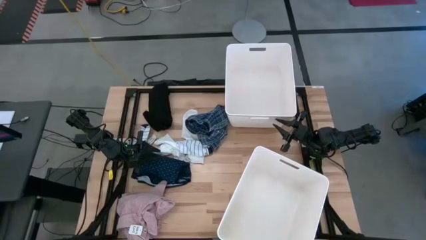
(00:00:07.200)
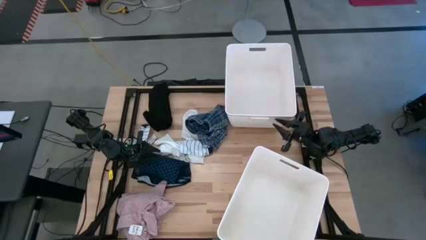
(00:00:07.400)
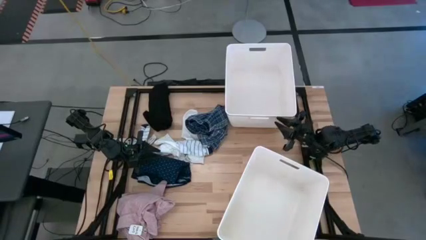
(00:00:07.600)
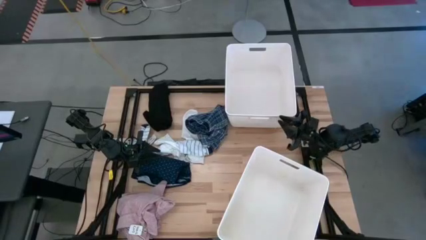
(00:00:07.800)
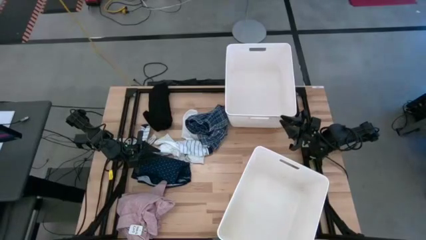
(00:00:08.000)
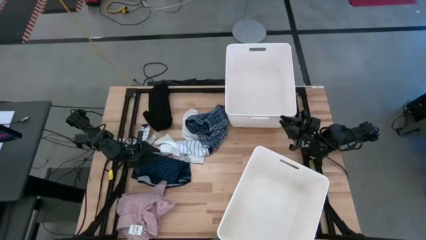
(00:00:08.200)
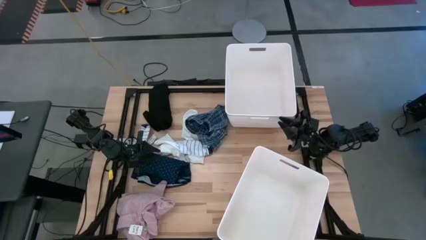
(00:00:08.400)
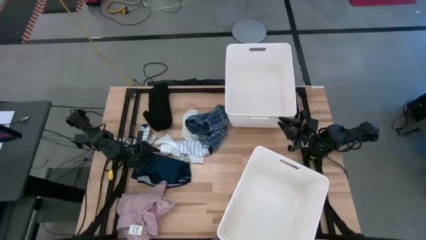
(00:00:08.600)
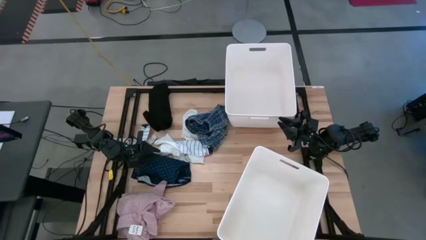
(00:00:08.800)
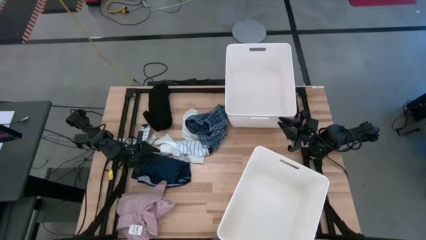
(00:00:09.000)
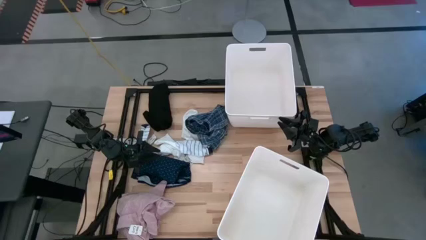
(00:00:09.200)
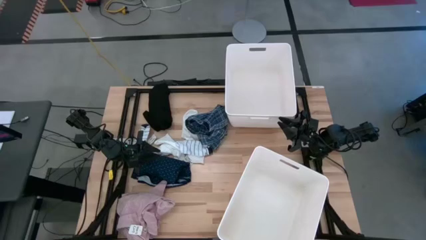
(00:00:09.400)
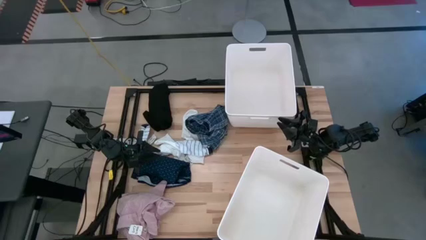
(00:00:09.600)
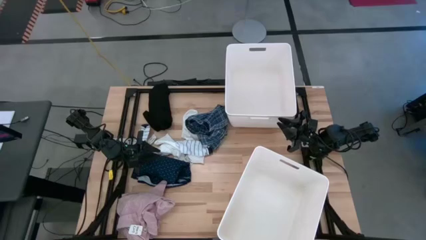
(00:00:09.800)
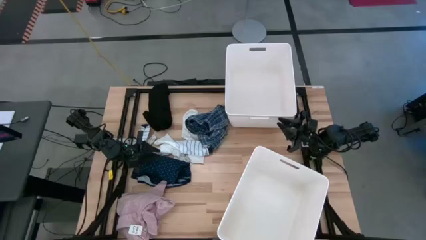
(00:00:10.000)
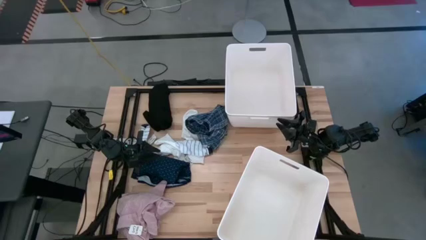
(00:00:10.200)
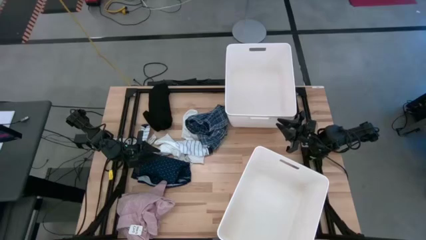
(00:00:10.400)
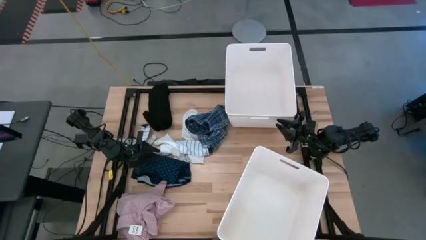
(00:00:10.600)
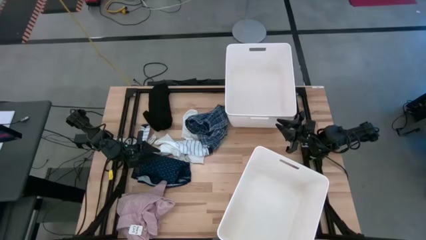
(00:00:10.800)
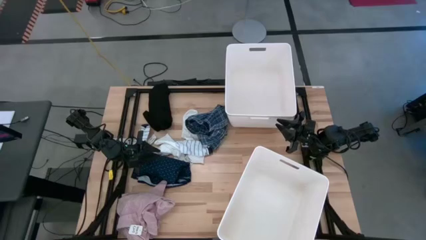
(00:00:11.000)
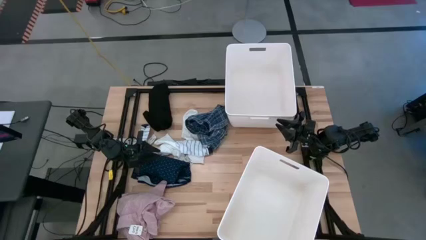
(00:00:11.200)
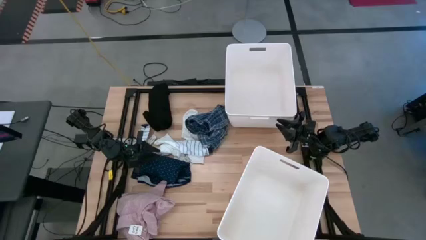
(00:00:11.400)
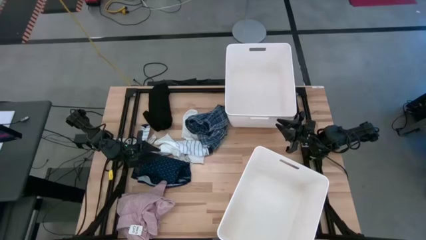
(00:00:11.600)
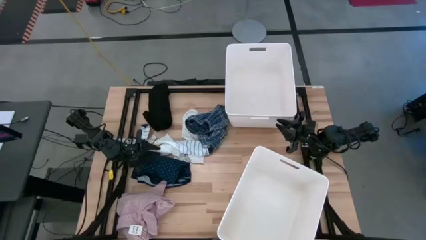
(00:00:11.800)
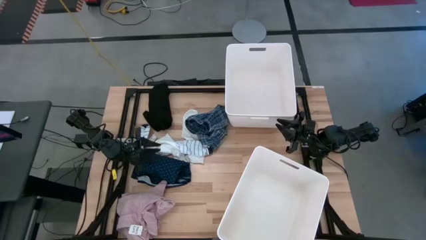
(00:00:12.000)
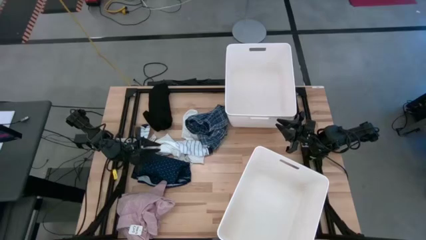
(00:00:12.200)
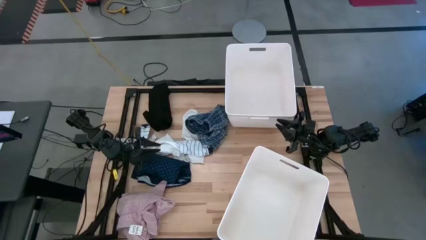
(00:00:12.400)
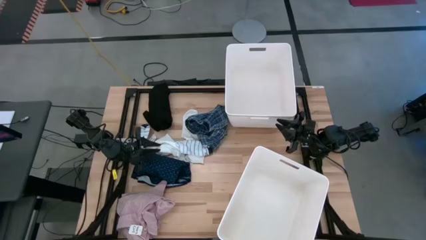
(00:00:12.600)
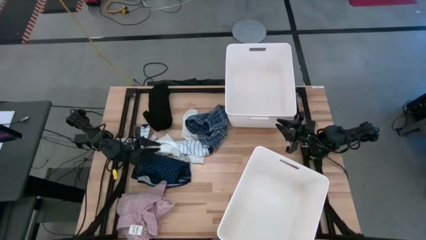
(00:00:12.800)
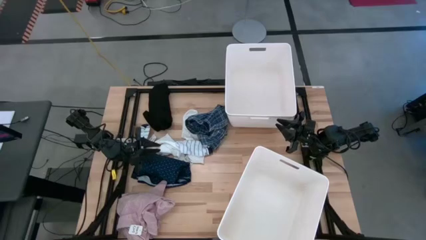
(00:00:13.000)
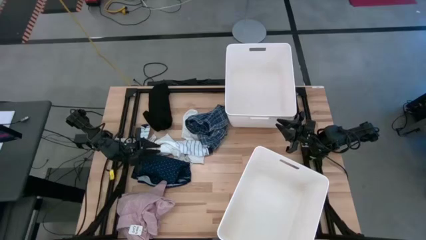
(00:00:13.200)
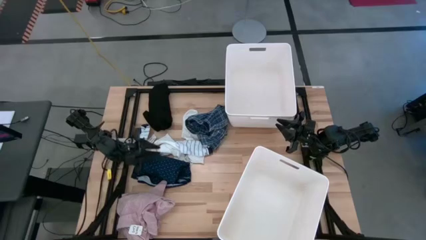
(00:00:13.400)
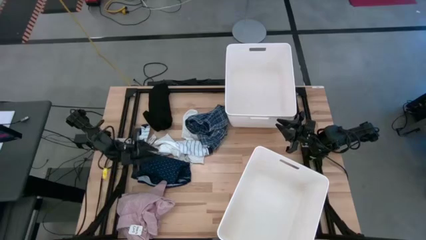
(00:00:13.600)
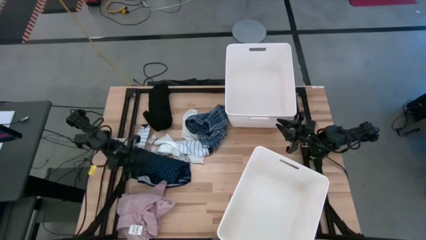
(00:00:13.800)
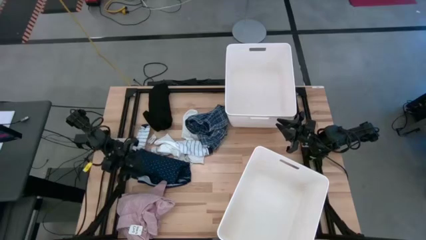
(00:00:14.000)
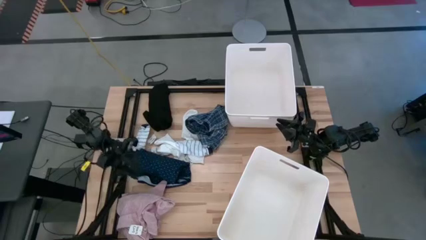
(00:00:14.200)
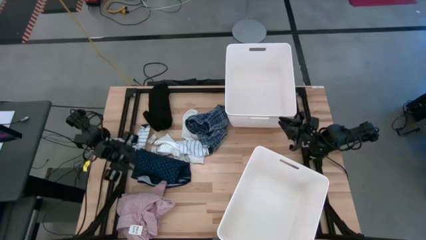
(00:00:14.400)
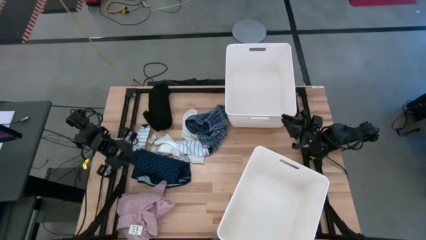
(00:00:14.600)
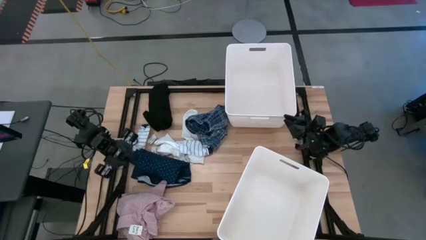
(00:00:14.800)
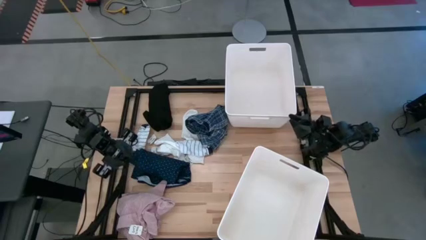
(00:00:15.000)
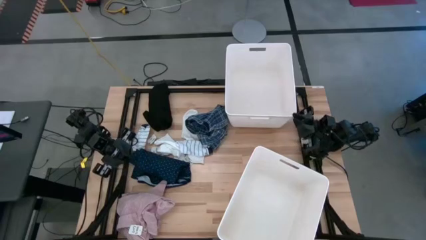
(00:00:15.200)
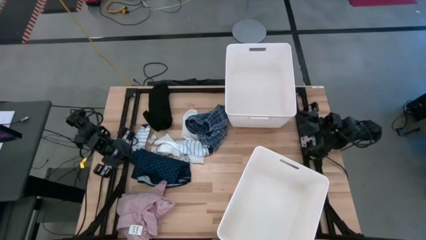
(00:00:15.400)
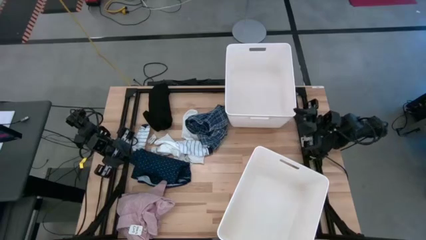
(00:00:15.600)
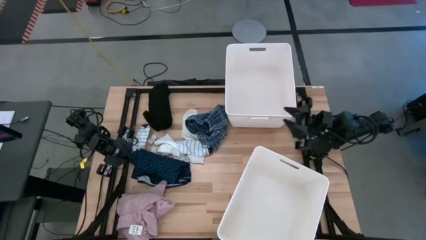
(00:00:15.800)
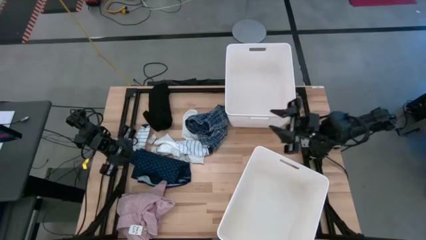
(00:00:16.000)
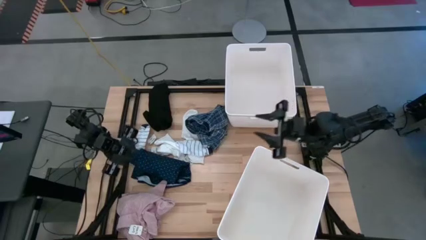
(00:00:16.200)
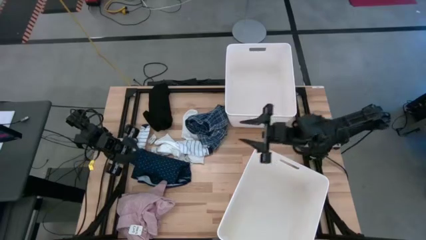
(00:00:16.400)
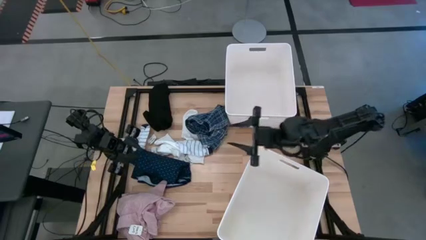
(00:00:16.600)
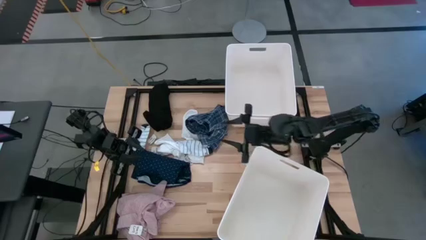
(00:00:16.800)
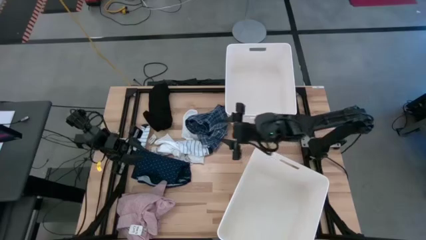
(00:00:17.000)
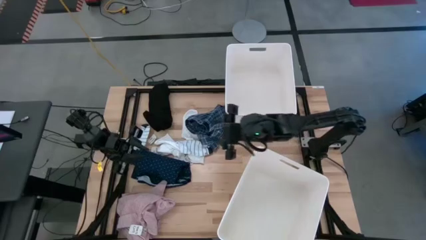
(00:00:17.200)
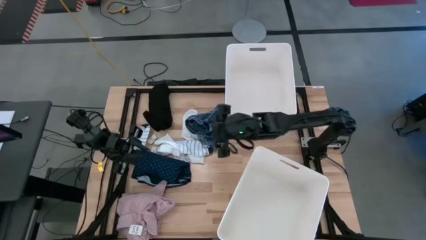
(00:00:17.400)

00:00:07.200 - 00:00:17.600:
Task: Sort clothes
Put the blue checkered shorts into the bottom white laundry bin
